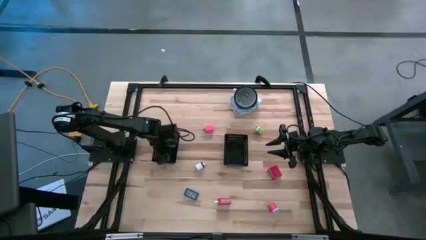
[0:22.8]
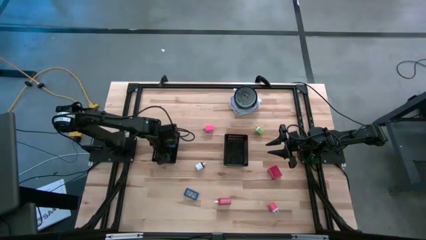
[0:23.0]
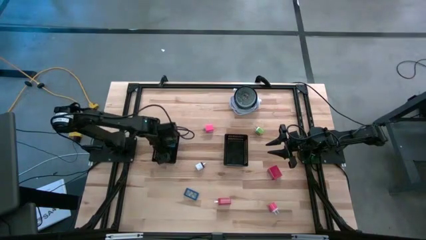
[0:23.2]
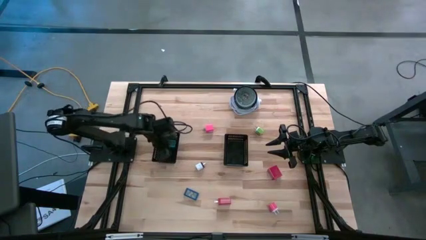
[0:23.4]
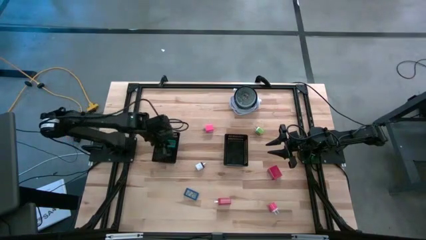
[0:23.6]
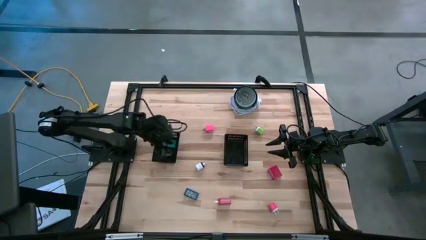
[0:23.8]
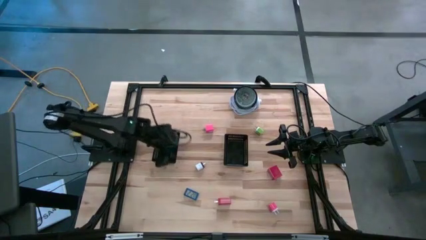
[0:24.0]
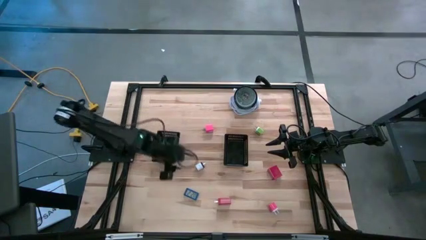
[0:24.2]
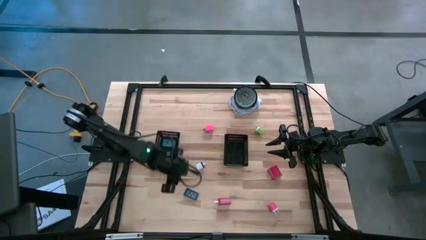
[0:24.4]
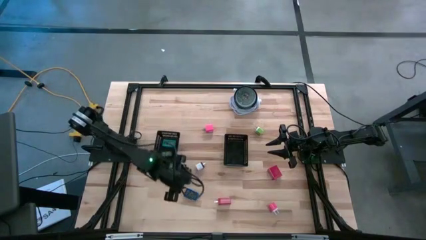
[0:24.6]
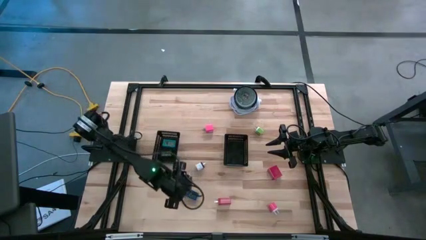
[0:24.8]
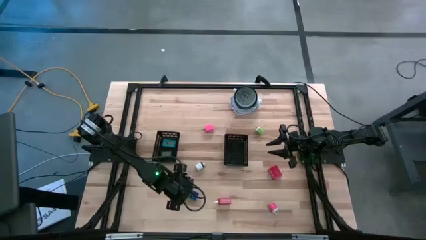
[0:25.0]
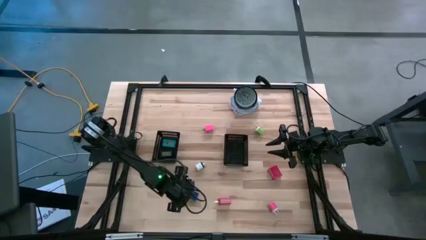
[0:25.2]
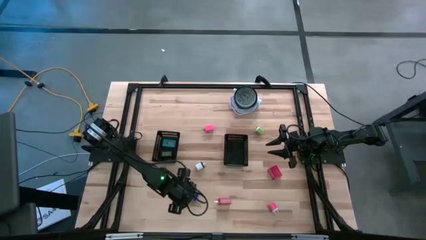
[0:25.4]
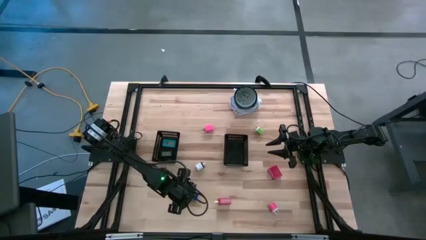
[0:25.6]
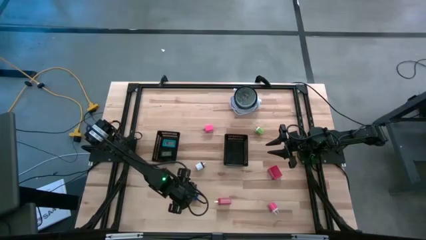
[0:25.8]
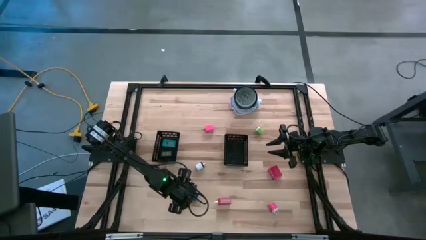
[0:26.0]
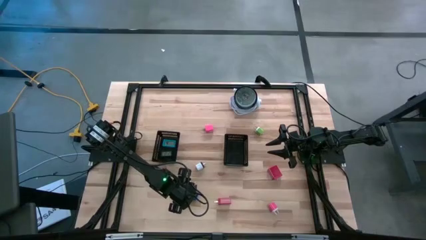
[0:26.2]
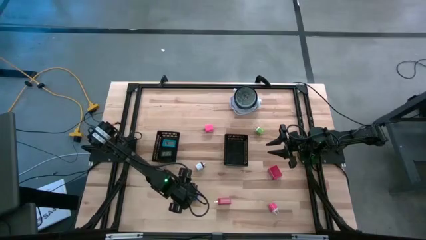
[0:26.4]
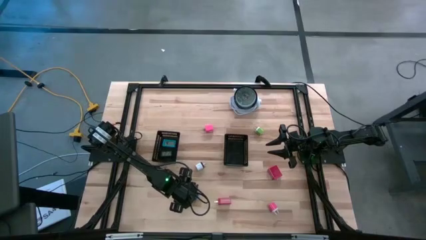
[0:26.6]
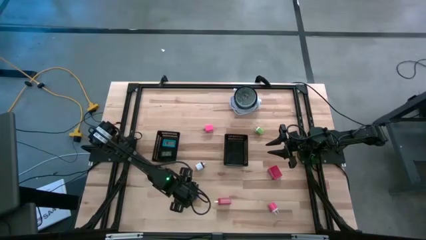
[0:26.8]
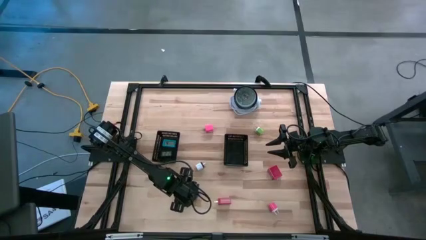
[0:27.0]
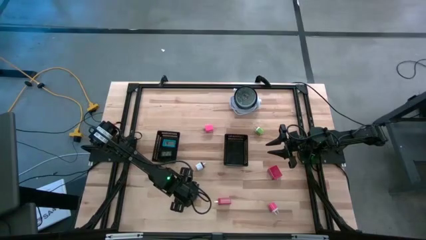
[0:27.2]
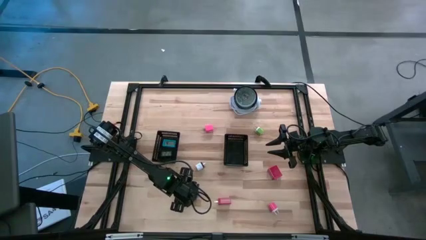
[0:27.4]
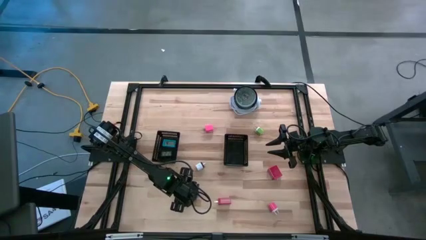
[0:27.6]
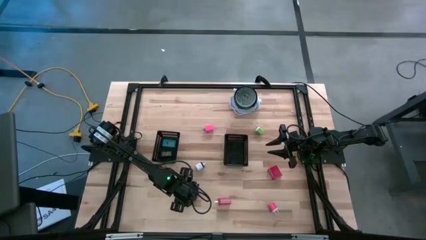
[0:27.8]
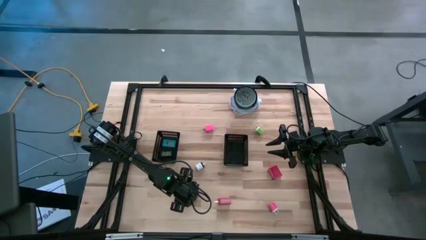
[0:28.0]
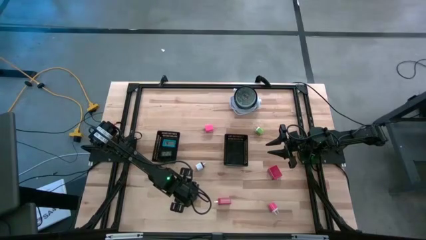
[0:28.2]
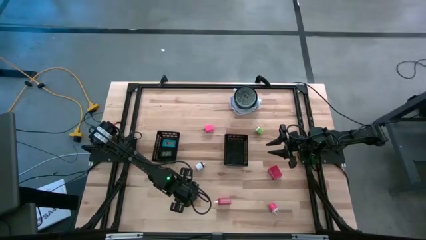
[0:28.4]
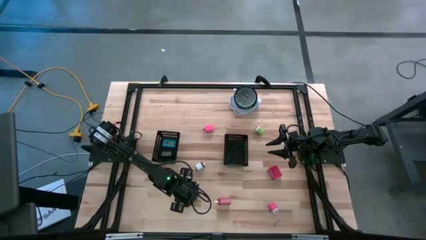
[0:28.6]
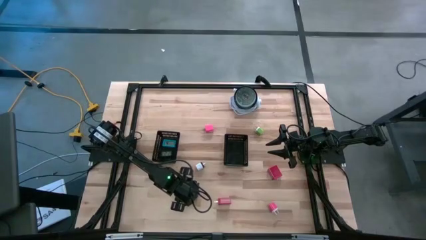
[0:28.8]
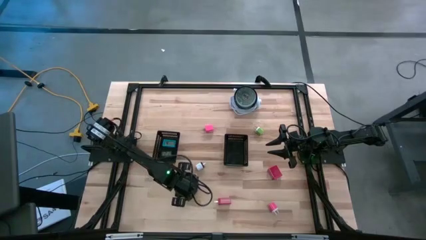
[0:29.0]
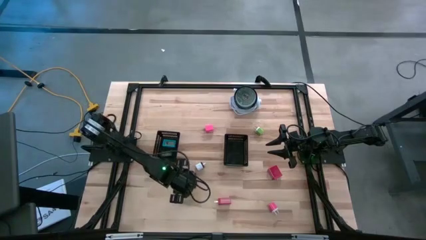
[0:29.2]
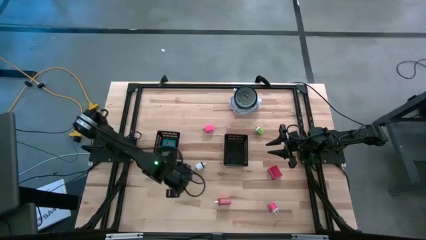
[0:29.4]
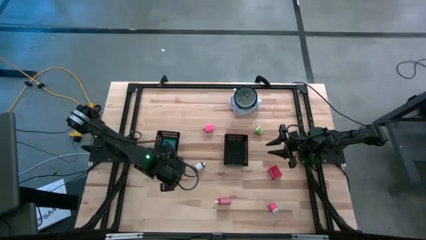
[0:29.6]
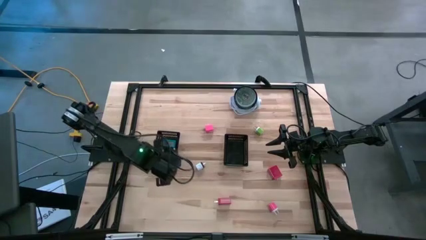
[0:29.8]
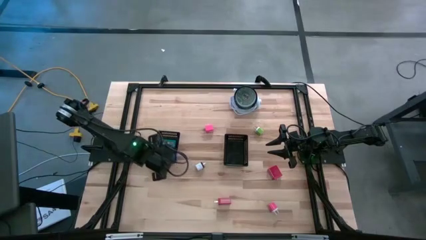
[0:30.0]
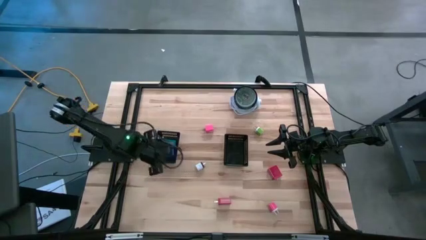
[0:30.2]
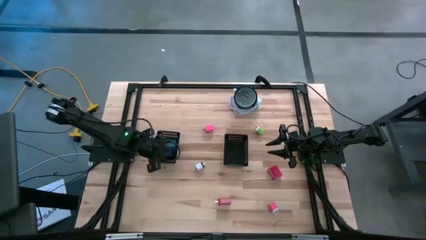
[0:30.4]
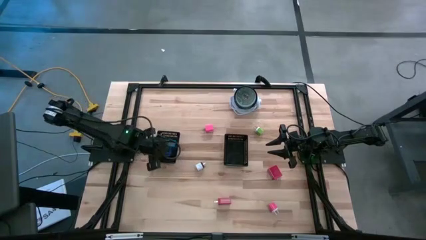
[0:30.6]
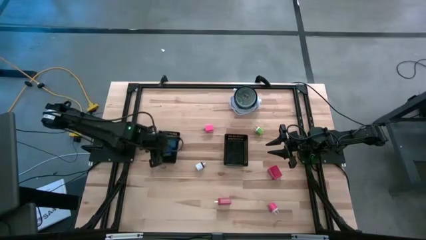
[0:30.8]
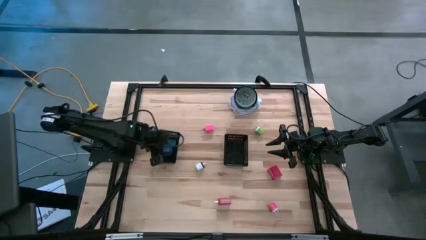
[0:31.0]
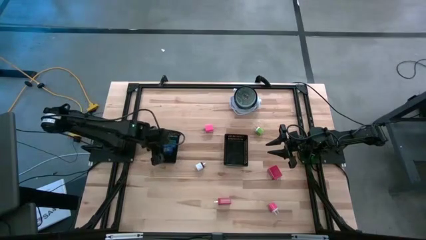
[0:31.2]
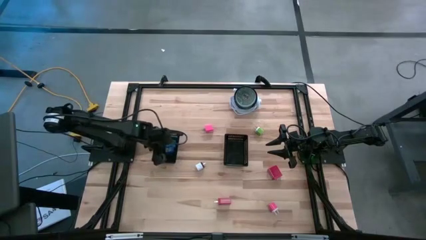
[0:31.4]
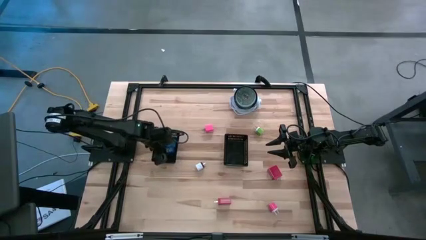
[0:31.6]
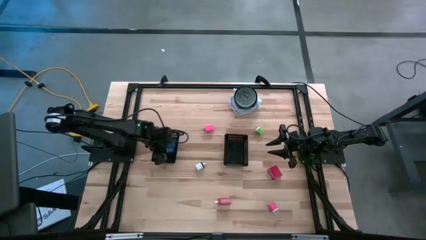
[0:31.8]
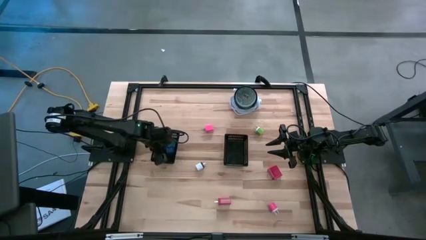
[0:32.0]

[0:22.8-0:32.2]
Task: Pick & Place Office items
Put the blue digital clock into the left black bin

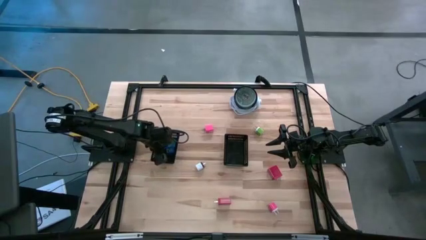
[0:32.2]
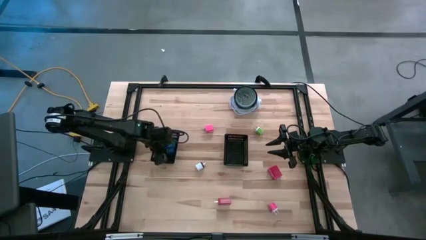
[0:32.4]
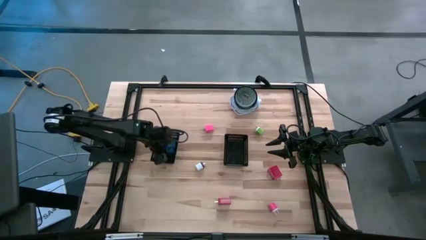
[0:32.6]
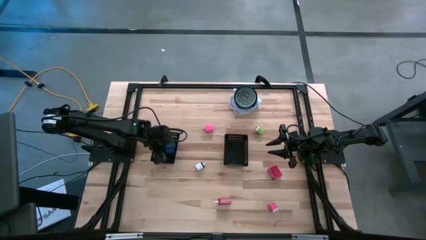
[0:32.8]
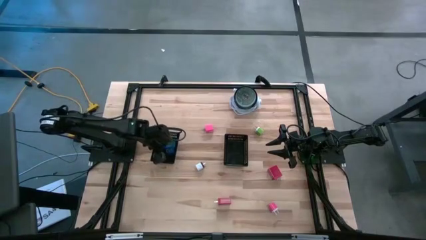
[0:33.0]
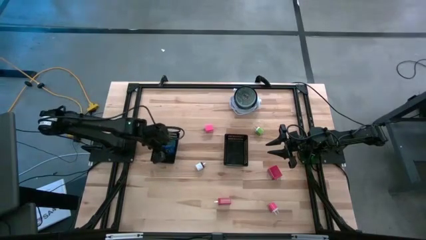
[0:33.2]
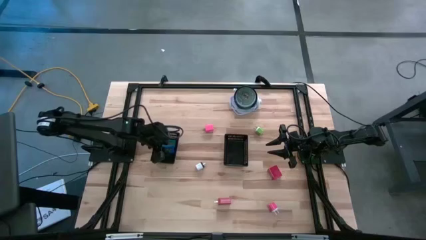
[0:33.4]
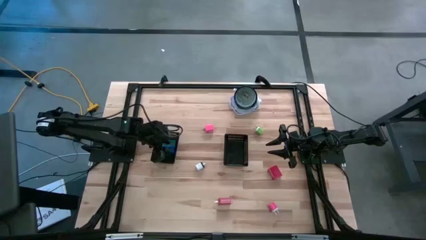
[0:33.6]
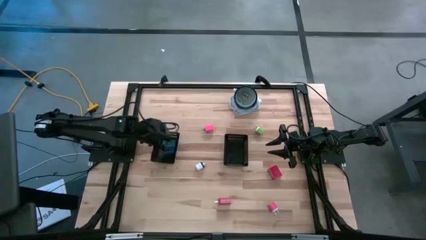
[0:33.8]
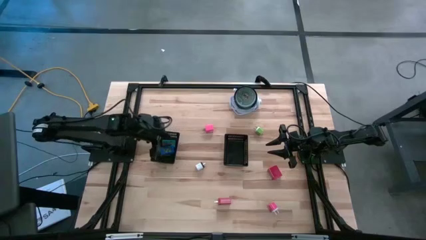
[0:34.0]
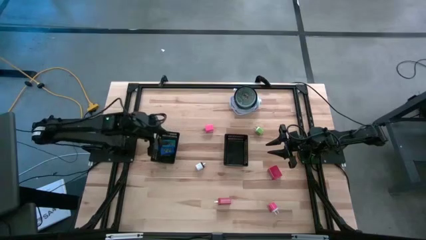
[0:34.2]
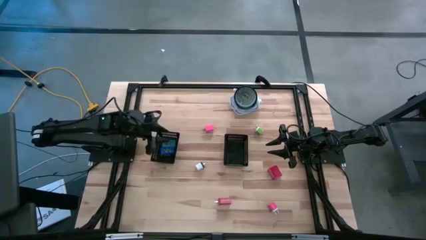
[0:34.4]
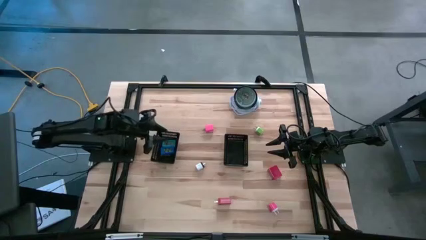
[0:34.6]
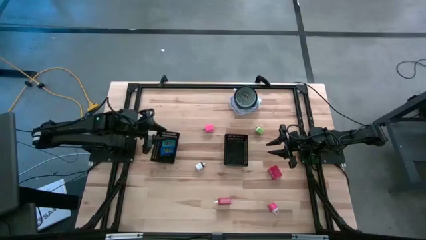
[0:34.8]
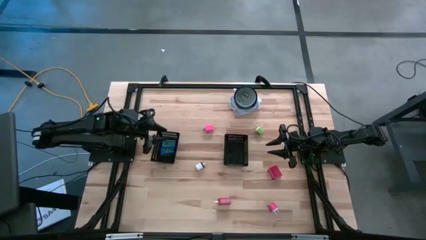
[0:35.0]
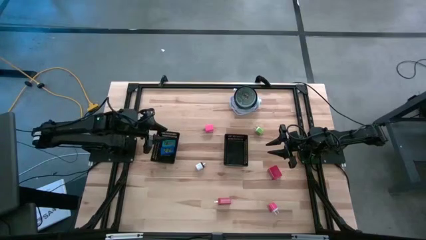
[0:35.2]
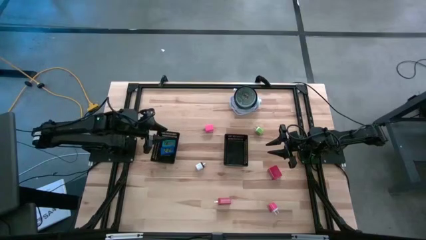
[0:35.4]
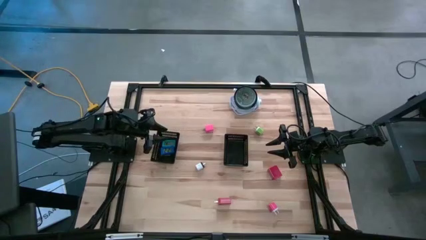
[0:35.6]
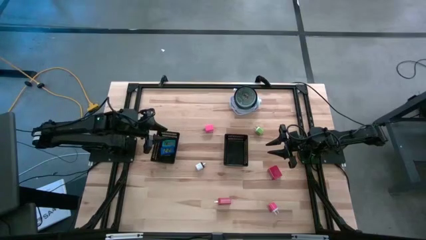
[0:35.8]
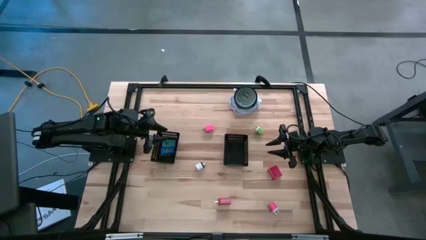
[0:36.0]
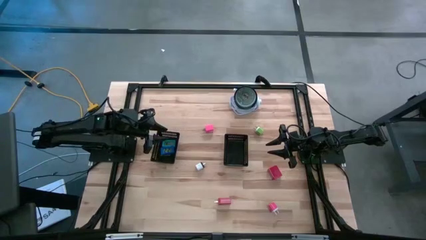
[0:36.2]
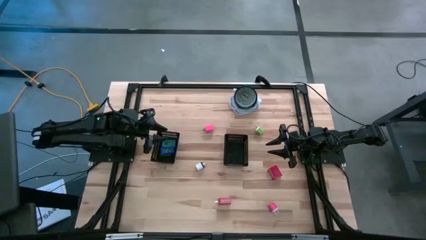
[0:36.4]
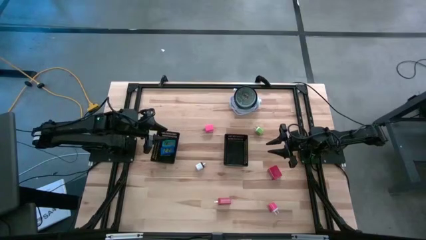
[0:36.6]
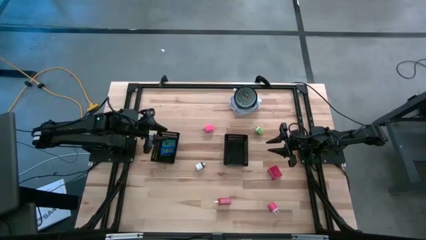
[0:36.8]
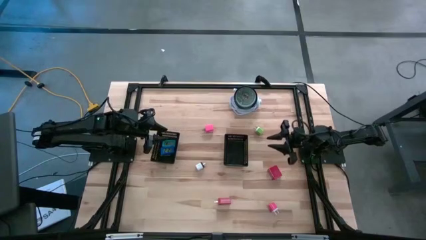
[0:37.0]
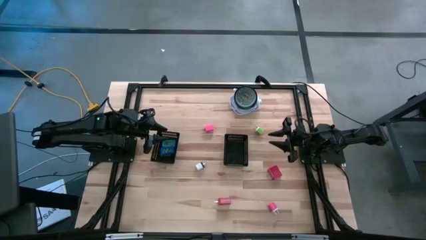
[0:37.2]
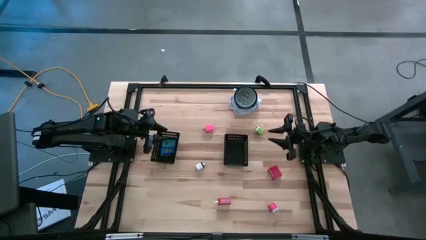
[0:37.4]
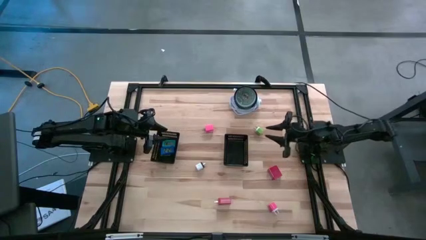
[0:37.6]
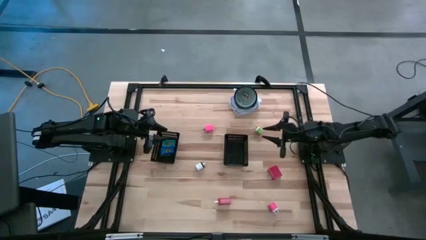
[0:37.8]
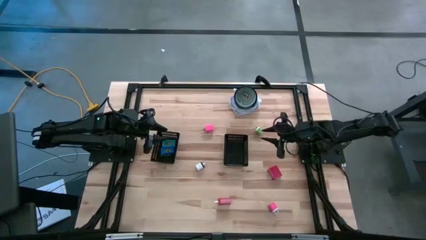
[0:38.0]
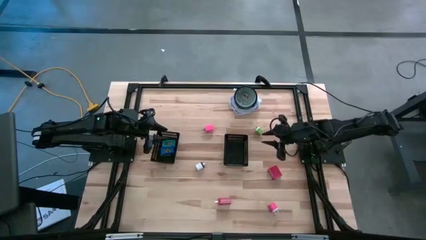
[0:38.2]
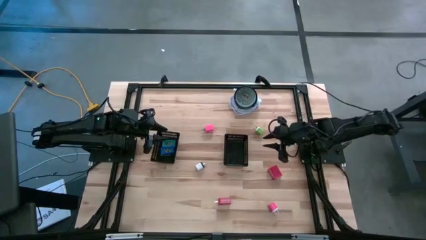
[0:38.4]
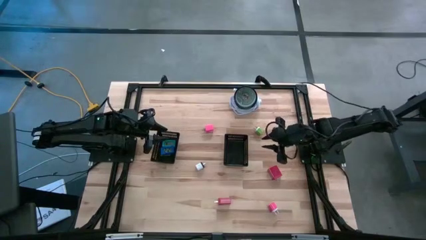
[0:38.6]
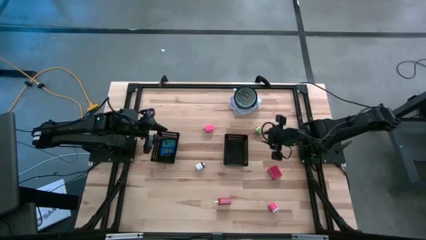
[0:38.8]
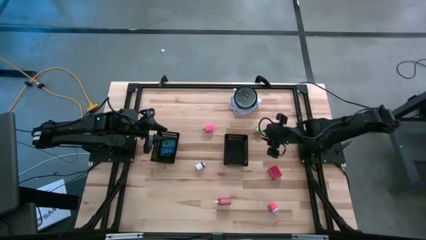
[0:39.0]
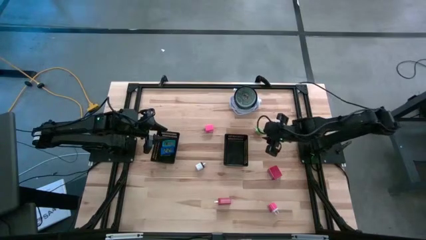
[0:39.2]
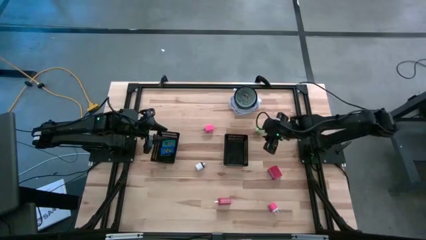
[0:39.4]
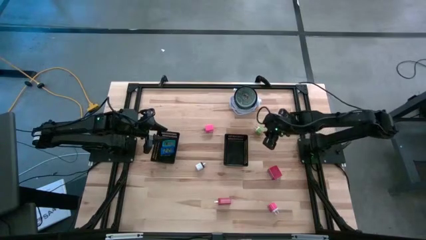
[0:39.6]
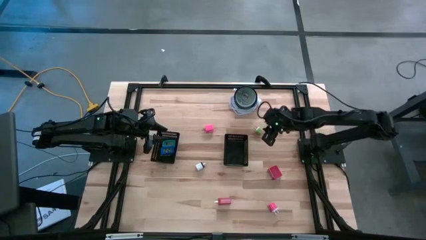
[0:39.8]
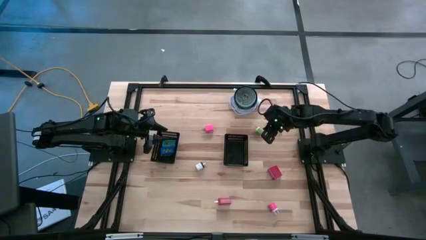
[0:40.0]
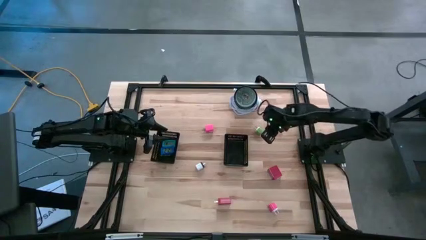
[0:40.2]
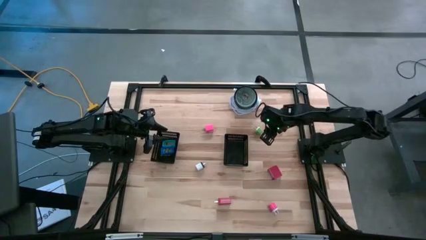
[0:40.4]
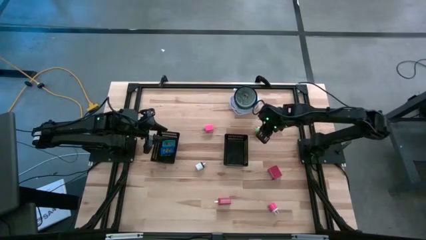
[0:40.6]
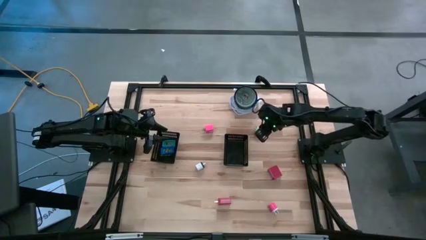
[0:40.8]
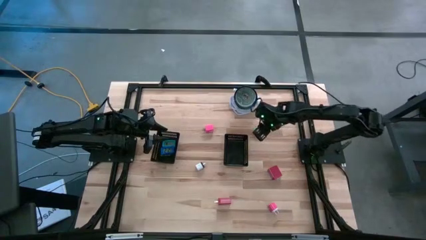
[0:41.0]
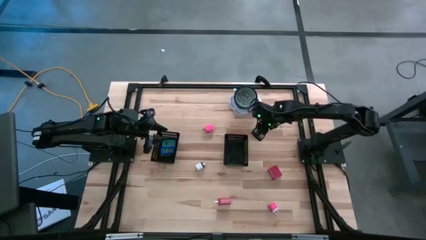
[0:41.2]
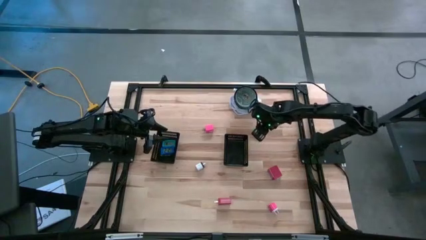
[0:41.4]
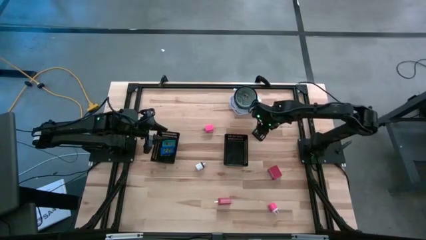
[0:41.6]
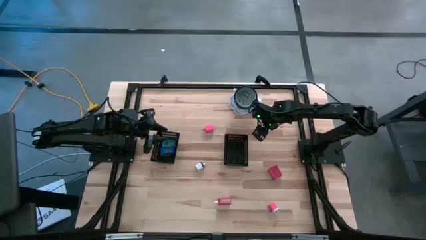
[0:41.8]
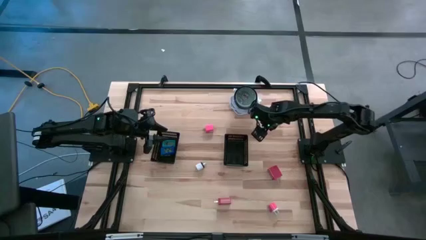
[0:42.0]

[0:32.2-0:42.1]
Put the green charger adapter into the right black bin
